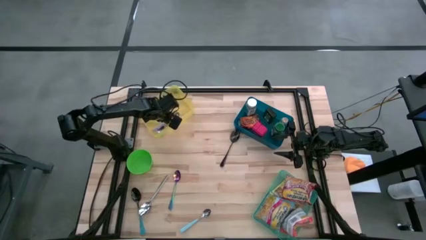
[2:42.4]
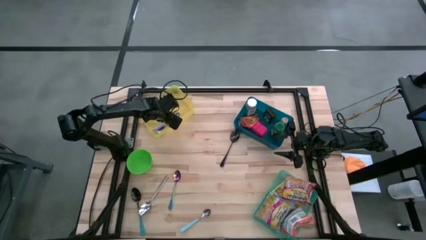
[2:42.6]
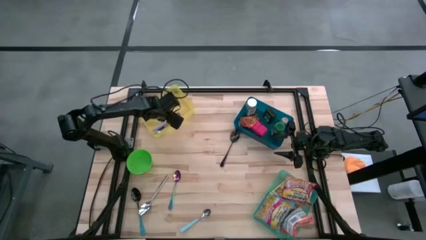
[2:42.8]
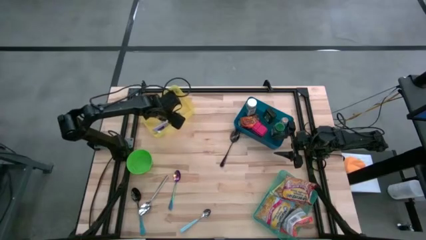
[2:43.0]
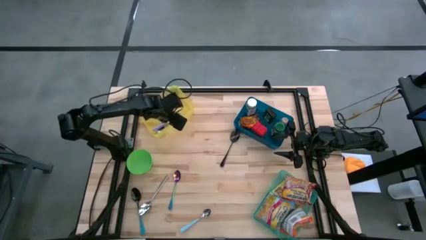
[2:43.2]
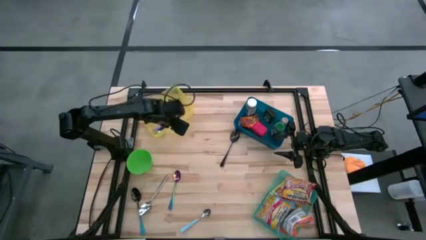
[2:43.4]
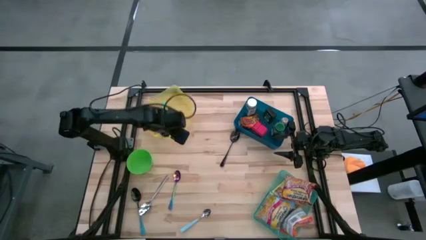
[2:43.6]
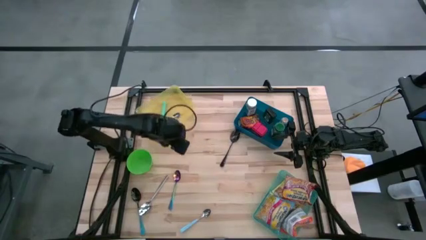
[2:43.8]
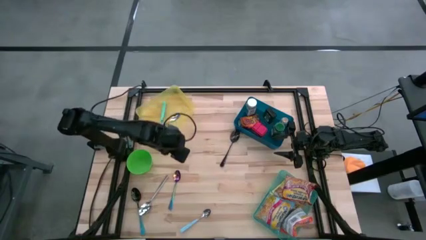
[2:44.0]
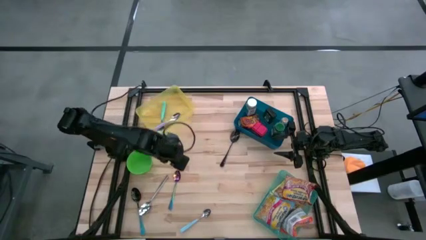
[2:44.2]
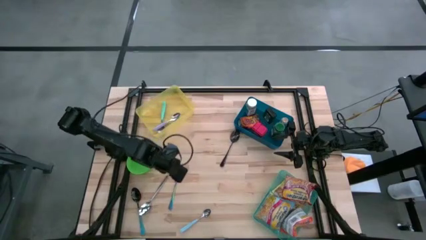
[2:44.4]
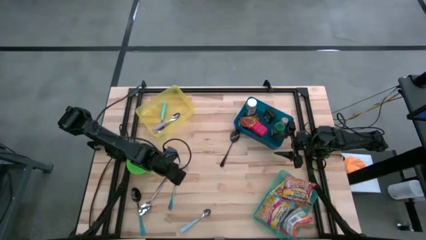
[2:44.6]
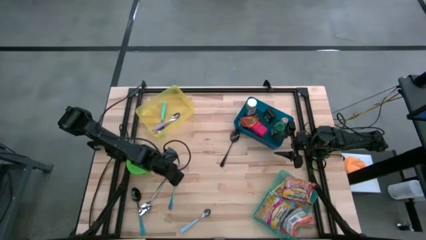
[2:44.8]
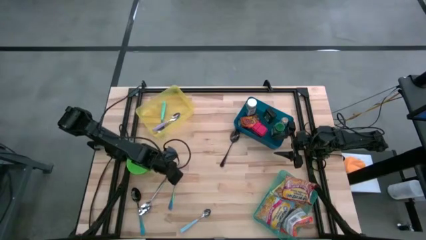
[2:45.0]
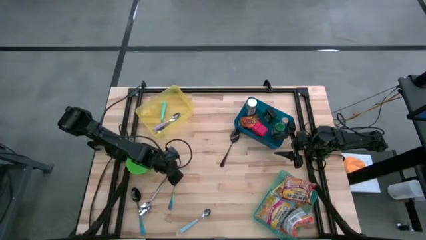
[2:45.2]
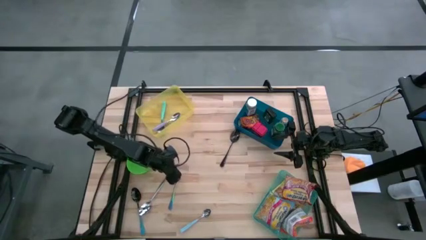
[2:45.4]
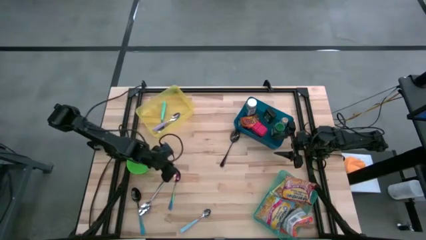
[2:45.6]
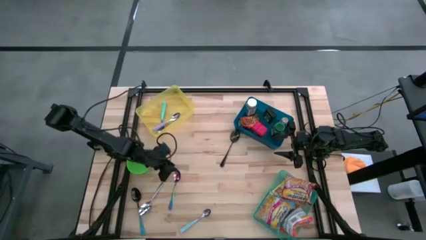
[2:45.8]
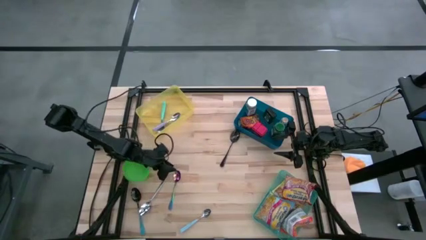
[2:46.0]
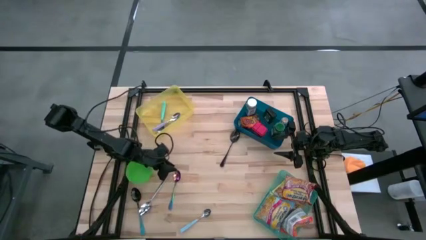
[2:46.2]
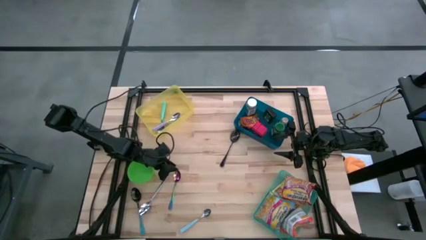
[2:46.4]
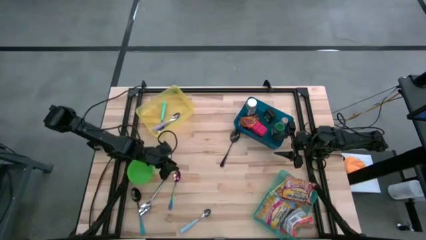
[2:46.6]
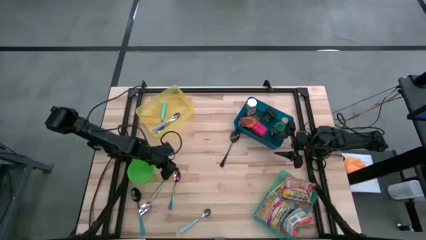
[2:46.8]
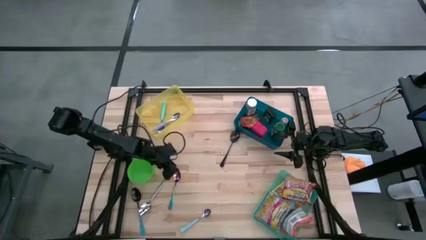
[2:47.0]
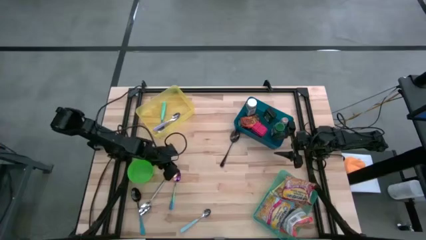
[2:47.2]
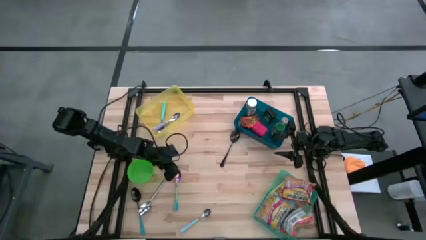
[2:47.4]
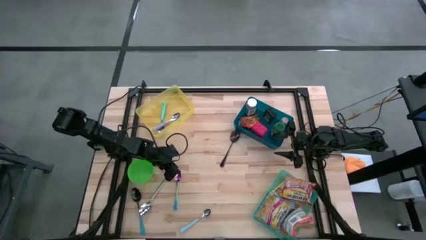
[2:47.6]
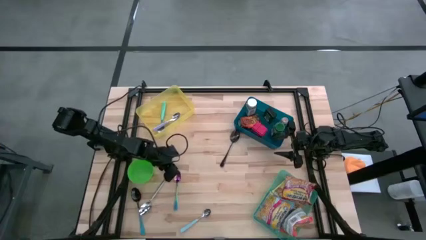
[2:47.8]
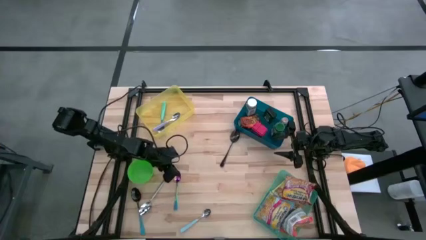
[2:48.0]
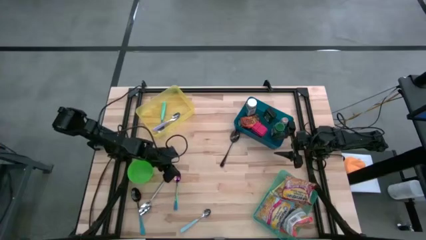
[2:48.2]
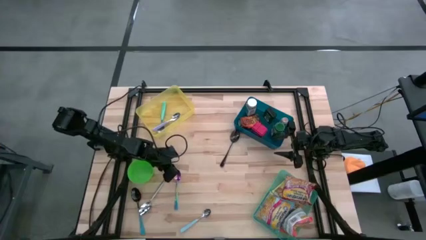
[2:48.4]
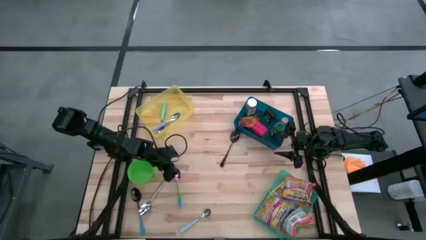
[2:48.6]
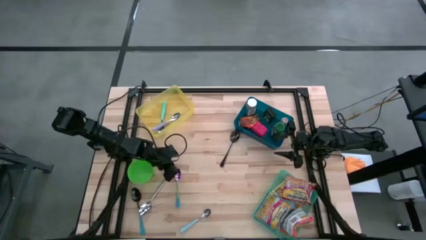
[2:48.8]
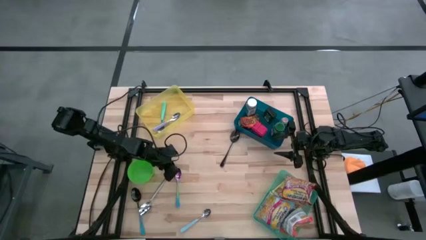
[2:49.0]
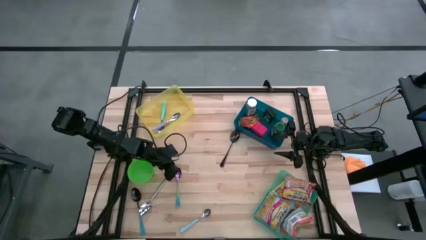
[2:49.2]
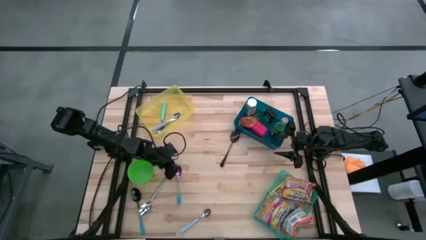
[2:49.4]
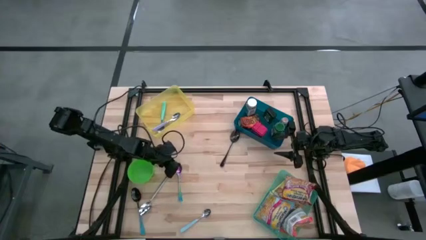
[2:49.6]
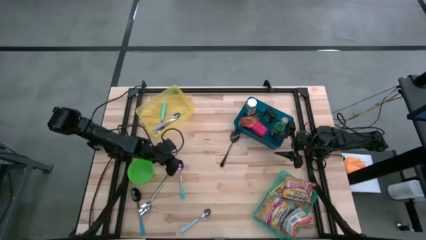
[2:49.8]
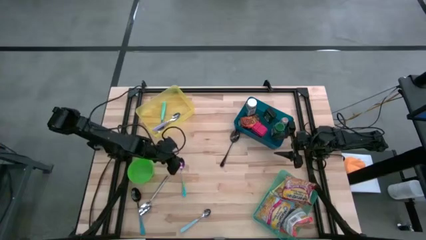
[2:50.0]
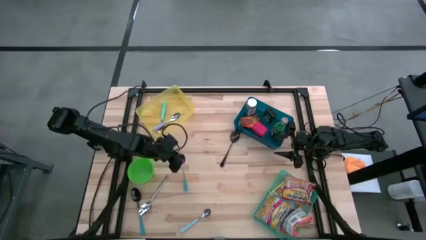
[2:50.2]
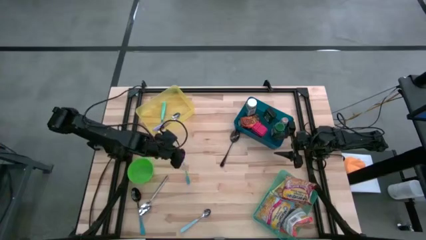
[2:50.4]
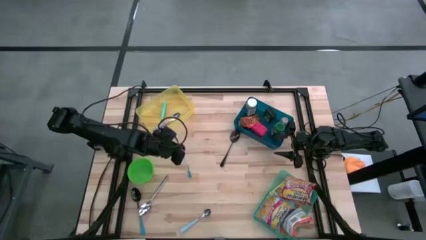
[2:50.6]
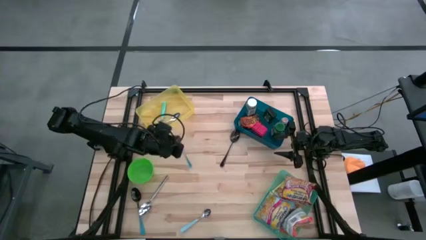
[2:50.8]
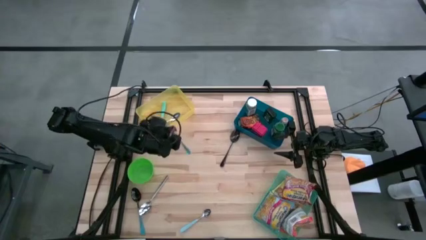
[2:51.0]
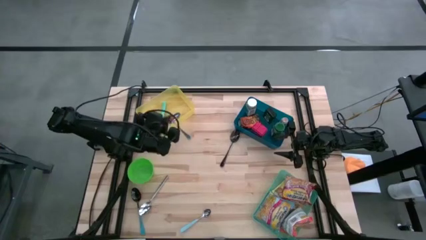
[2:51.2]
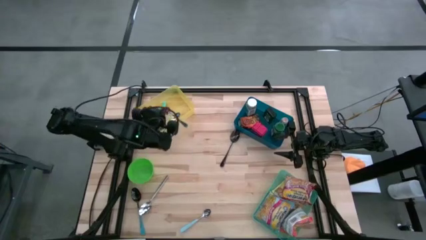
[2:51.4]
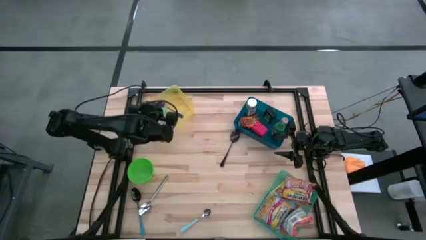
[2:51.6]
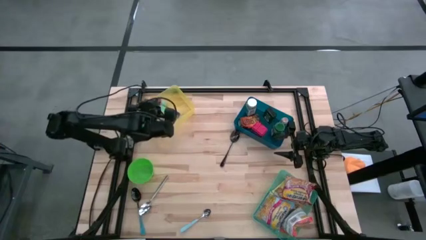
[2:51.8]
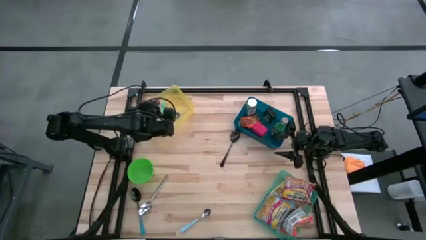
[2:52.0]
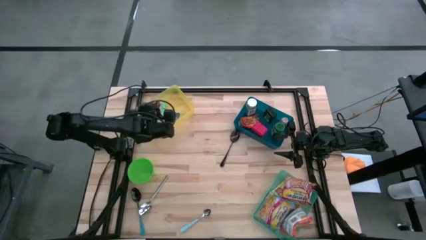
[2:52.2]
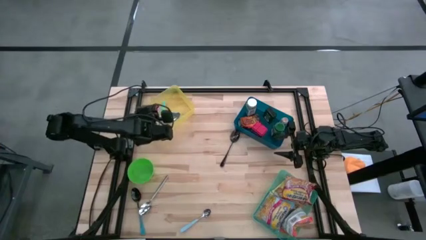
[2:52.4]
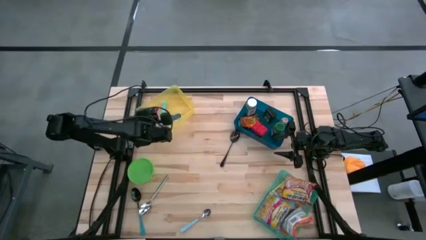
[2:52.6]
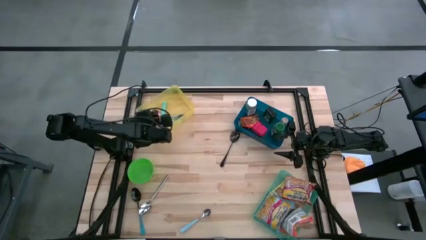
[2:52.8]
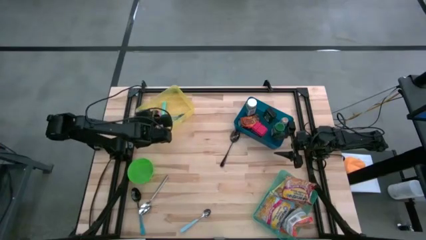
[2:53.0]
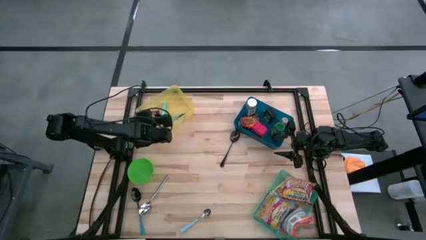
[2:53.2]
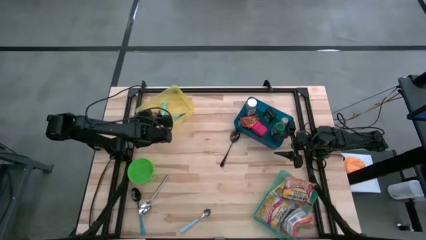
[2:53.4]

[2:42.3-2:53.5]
Put the violet spoon into the yellow bin
